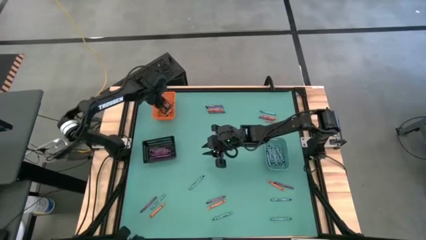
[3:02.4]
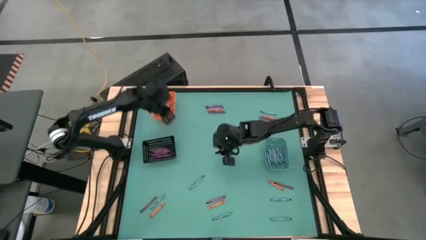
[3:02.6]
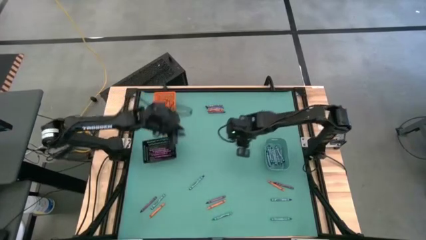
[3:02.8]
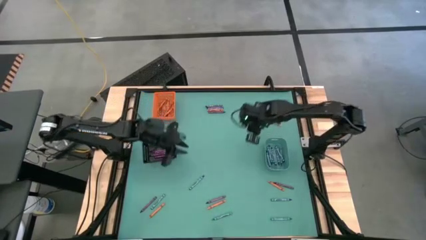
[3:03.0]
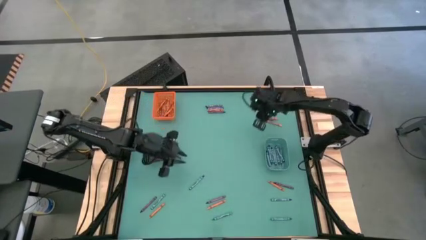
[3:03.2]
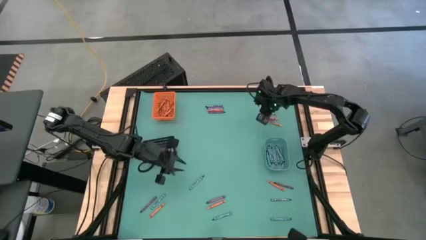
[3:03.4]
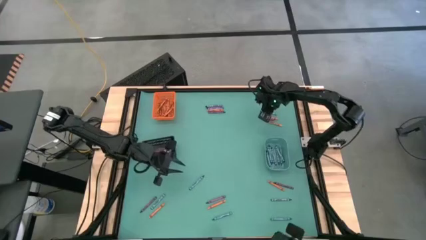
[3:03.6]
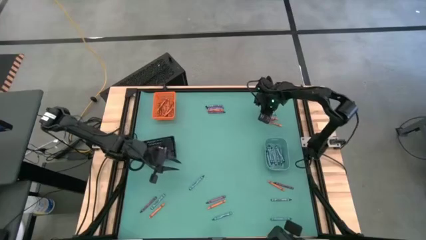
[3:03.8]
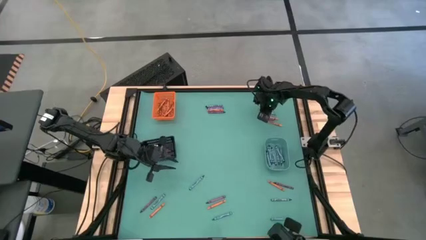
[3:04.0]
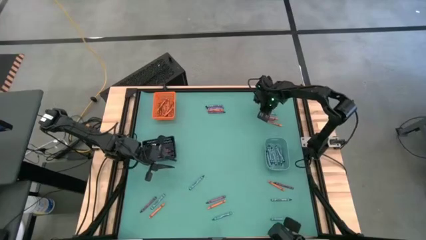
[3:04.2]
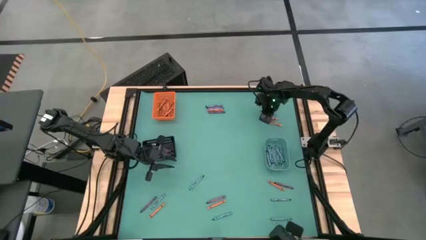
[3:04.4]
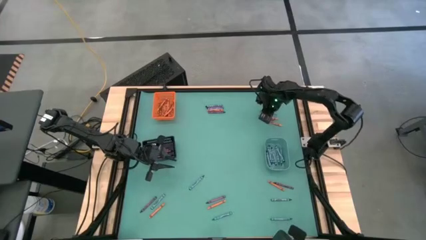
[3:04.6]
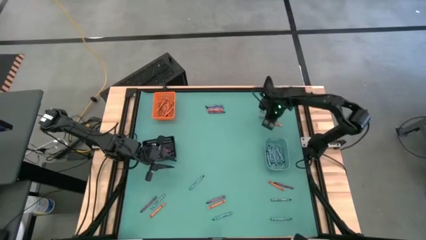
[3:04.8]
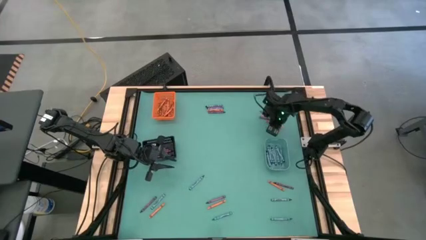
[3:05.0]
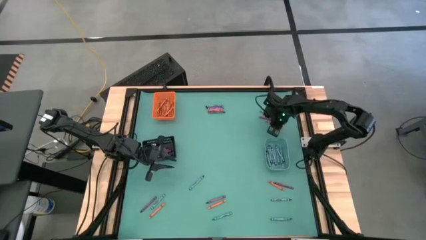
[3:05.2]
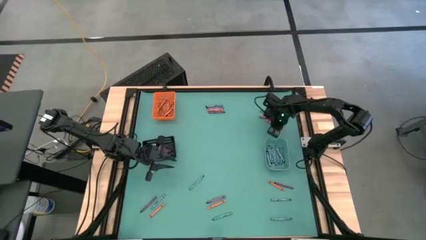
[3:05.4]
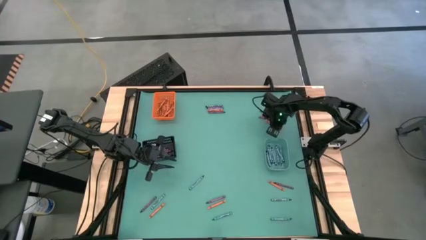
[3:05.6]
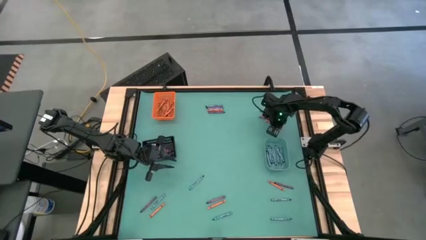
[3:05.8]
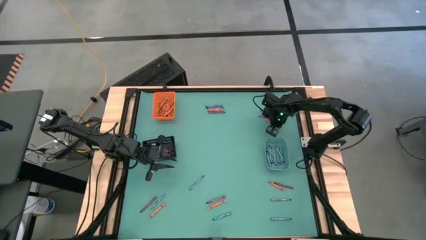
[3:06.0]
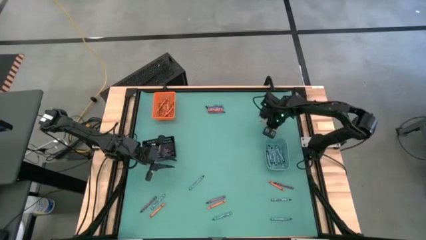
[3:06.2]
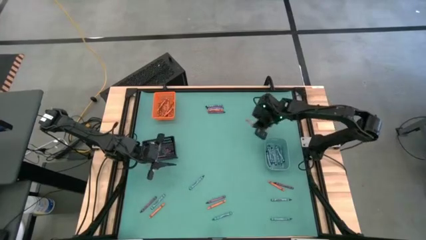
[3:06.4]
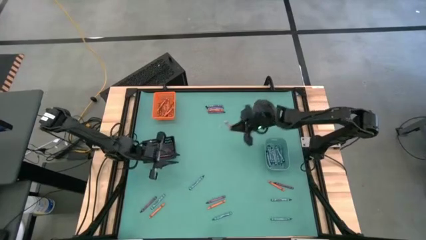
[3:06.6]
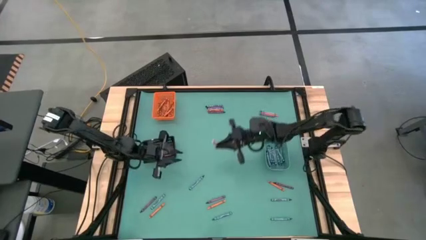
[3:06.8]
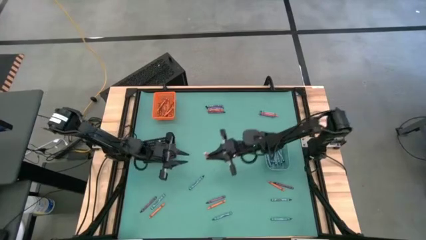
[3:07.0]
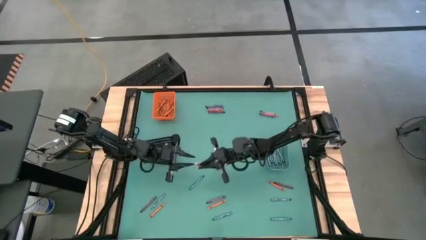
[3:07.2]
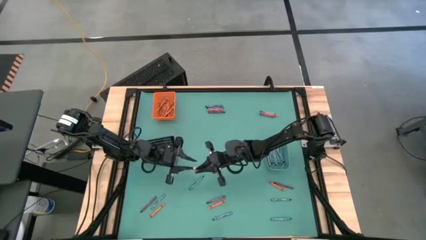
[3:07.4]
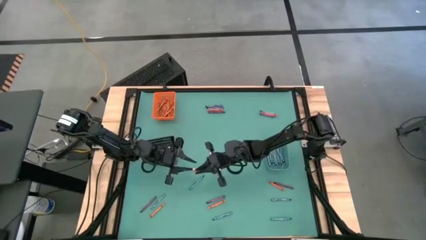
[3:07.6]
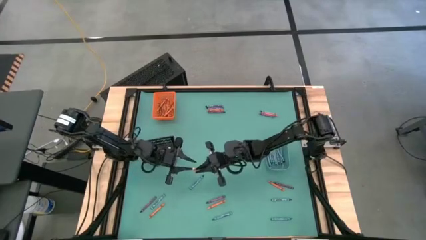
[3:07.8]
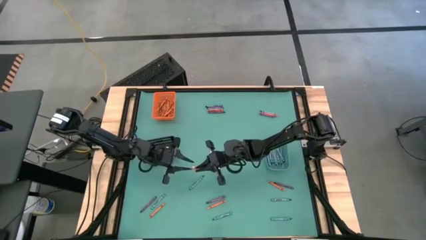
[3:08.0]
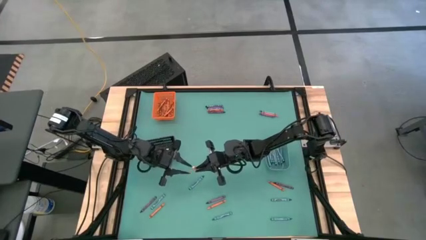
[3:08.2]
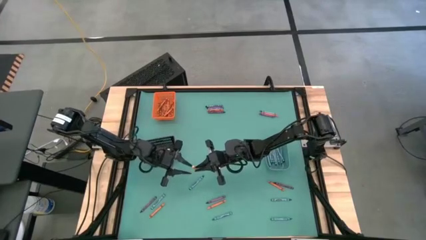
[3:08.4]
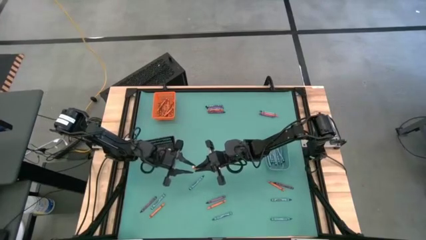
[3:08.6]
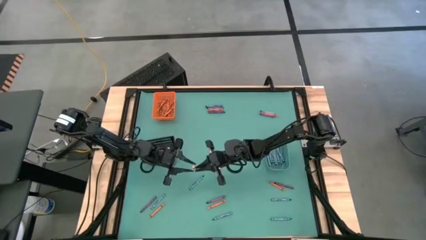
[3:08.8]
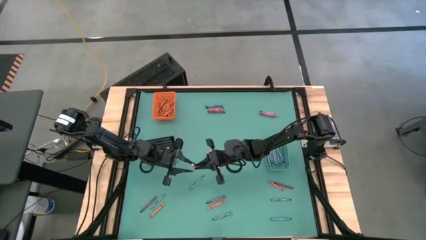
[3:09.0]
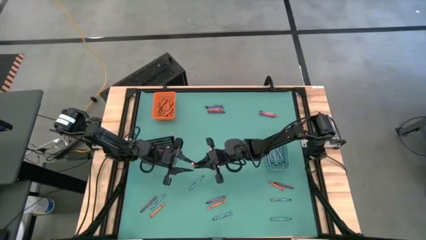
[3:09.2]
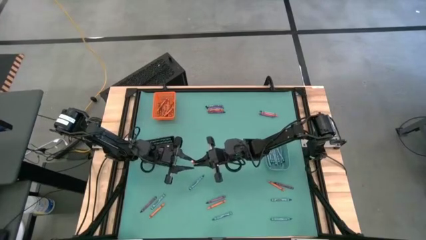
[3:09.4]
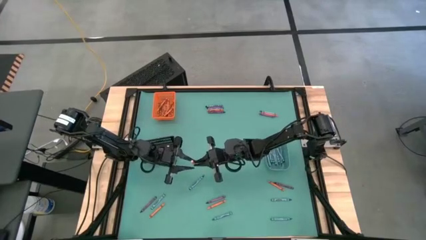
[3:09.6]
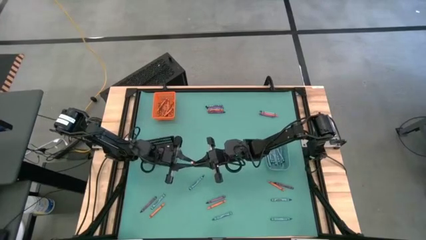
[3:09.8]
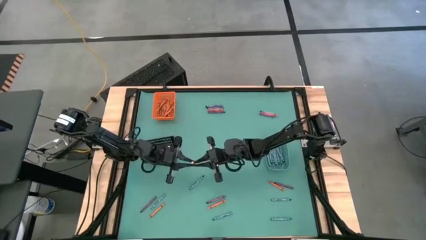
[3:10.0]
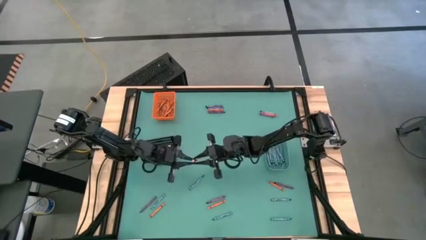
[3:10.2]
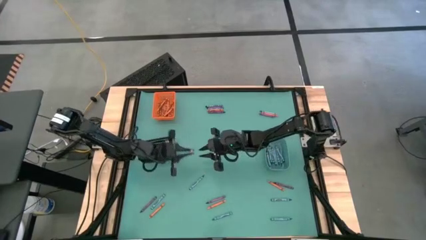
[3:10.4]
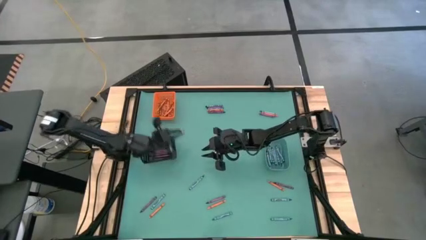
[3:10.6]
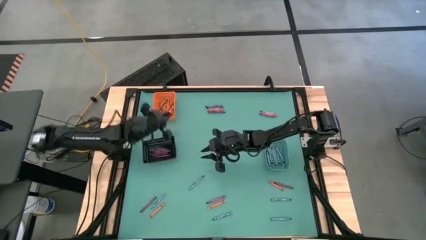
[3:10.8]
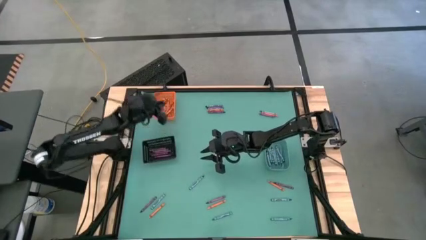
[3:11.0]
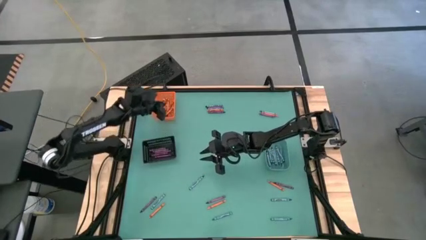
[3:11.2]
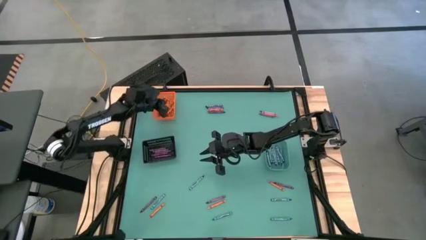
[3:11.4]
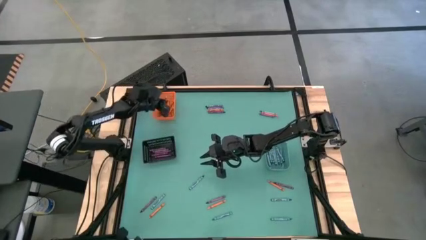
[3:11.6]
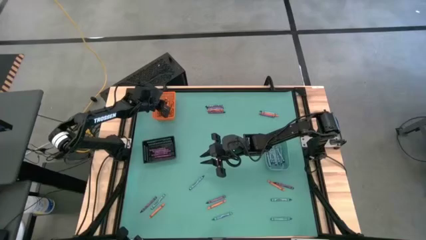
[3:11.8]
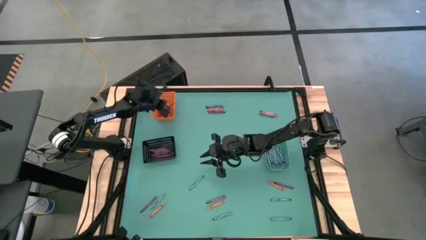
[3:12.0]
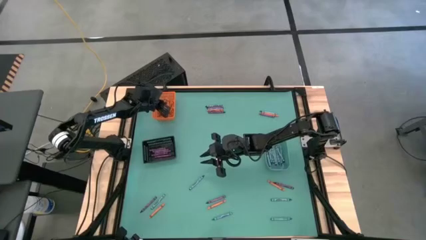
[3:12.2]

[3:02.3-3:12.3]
Task: Sort crayons
Put the orange crayon into the orange bin

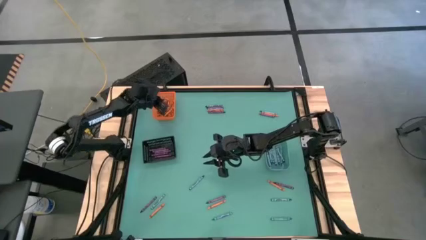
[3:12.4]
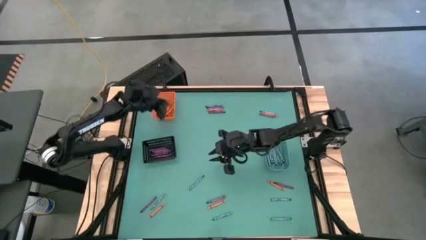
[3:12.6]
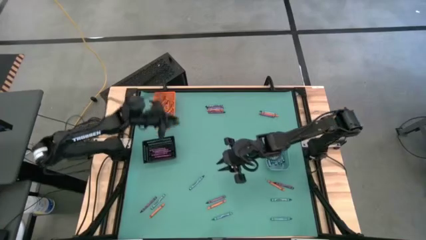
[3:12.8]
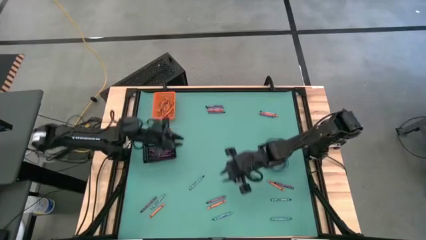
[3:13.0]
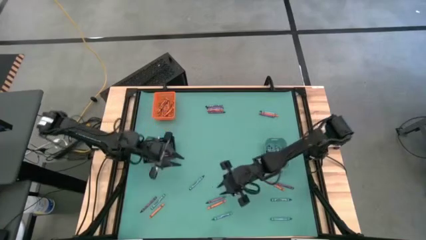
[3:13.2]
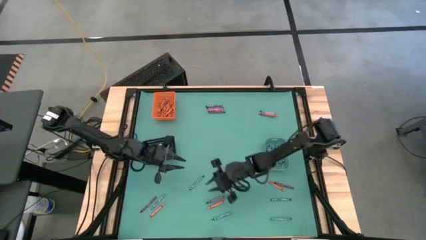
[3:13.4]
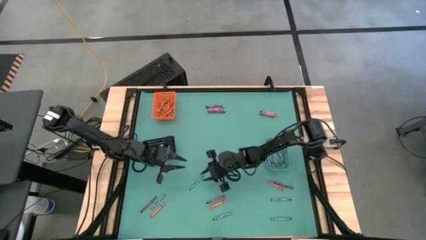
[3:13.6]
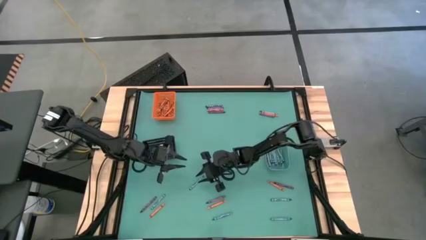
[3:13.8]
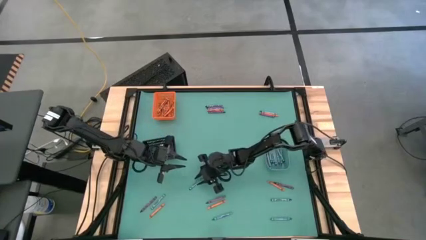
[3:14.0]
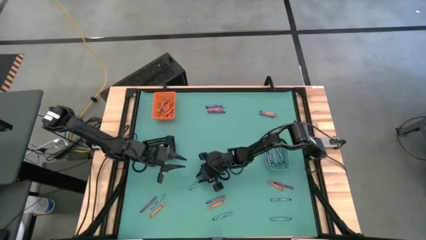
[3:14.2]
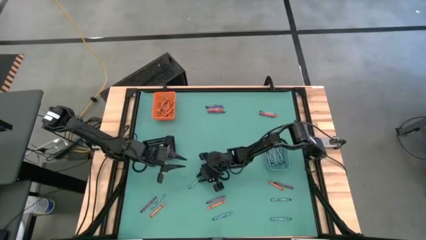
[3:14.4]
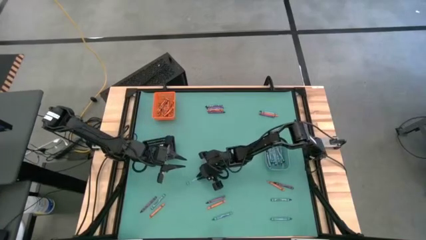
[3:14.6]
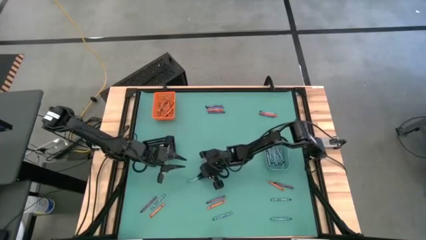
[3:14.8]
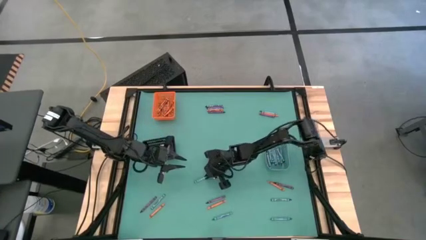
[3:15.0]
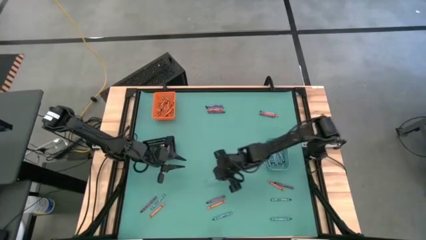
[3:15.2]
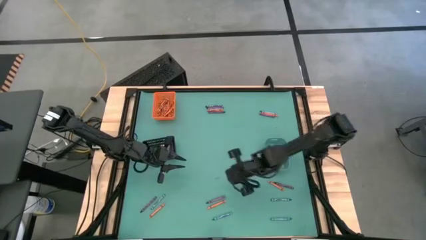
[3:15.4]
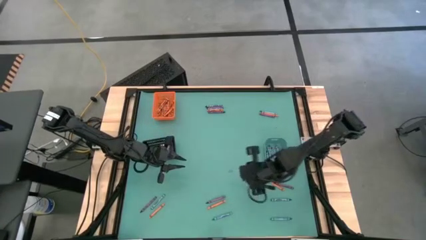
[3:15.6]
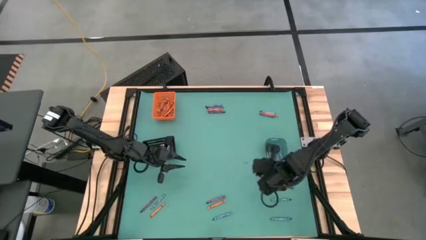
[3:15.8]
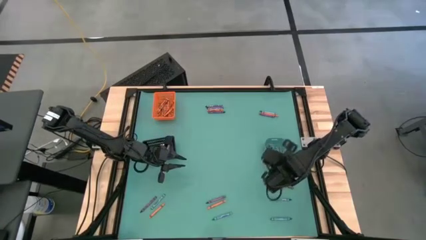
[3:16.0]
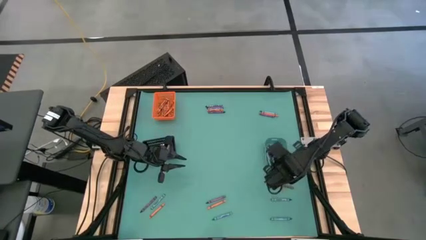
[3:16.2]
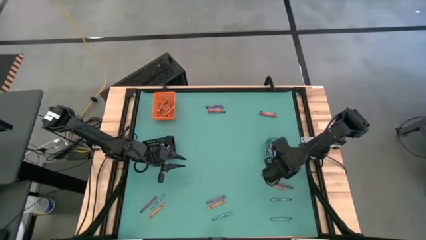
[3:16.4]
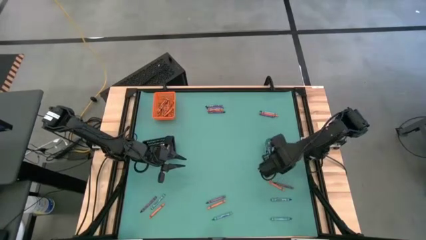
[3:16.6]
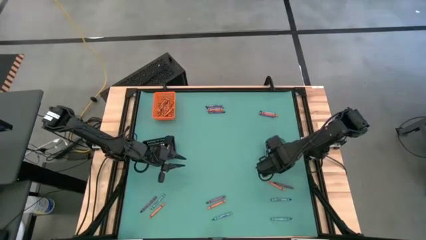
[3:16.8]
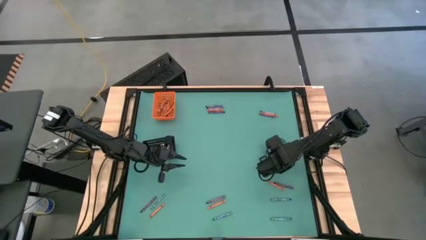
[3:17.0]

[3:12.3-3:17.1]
Put the blue crayon into the blue bin

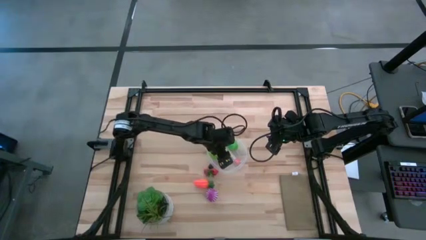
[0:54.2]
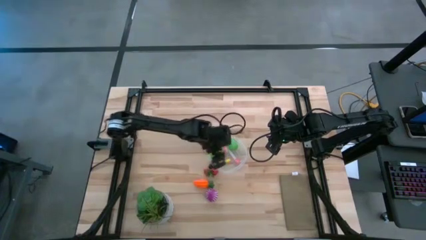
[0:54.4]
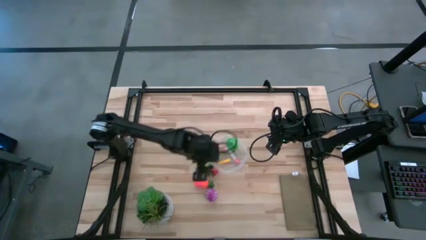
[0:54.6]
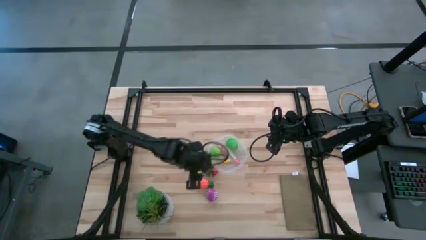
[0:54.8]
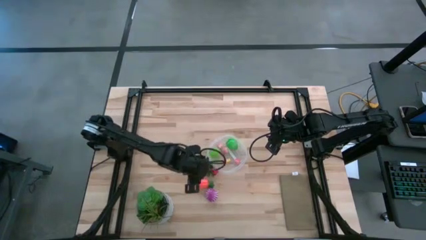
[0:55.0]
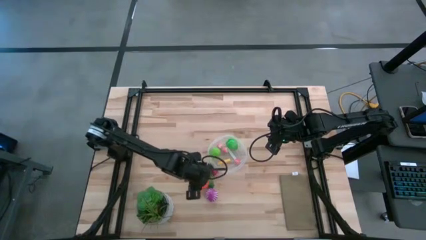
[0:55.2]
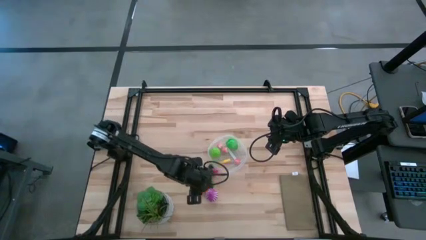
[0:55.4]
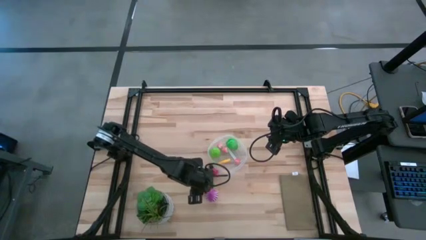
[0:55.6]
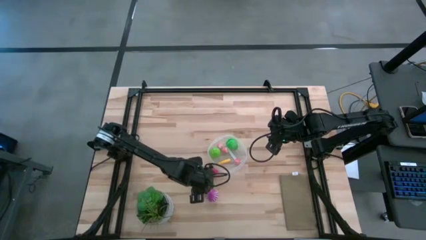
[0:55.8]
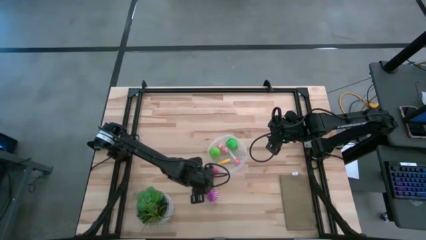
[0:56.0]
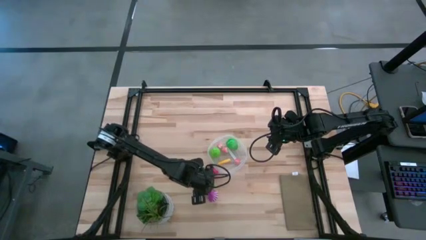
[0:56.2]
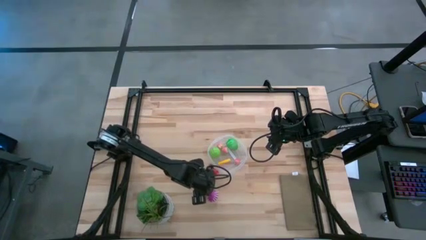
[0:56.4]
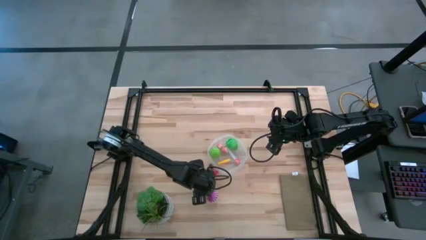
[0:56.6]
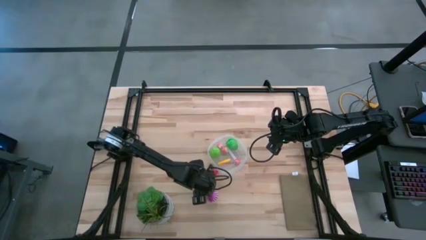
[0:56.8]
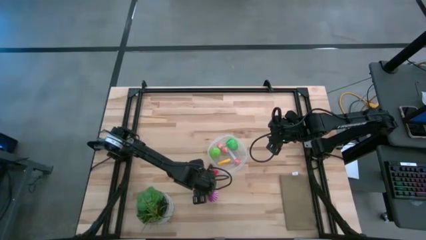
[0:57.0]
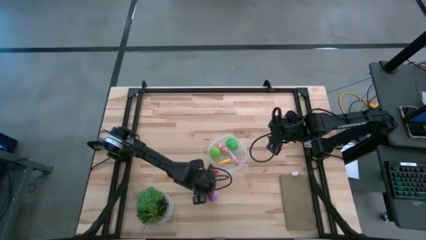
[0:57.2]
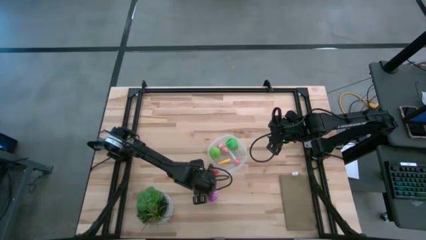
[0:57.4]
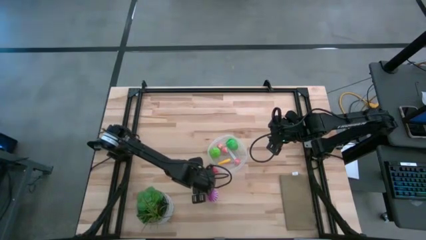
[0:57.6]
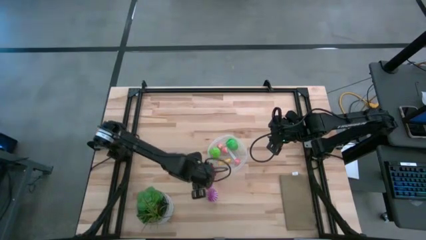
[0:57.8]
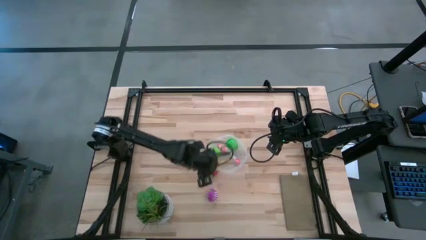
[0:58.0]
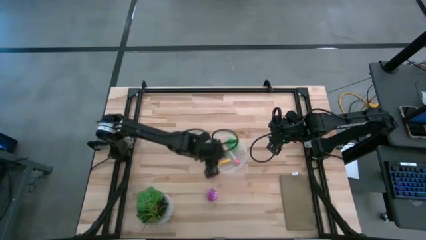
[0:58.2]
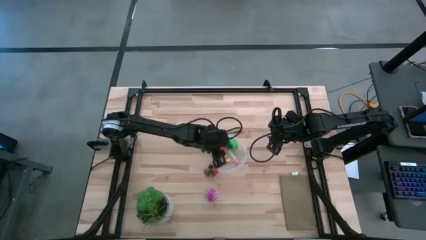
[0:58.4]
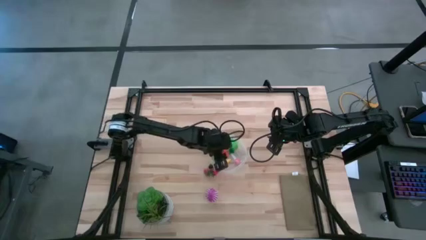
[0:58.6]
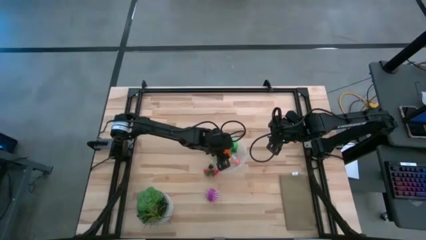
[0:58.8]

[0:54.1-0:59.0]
Task: Pick and placing Produce into tupperware
Put the orange carrot into the transparent bin
